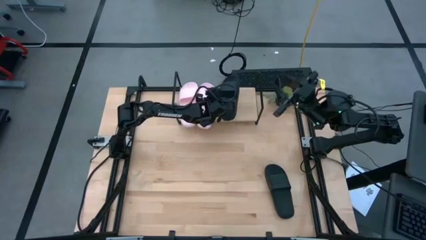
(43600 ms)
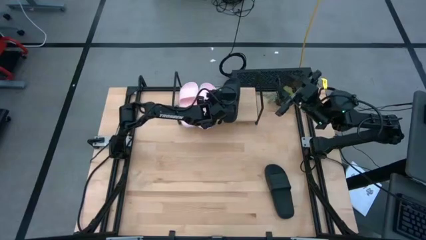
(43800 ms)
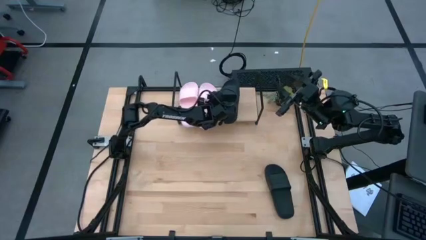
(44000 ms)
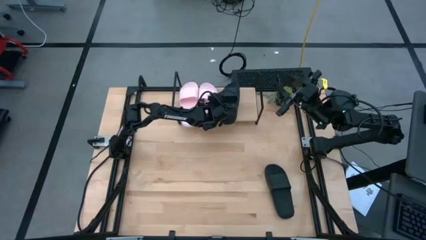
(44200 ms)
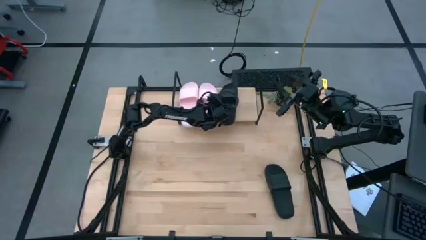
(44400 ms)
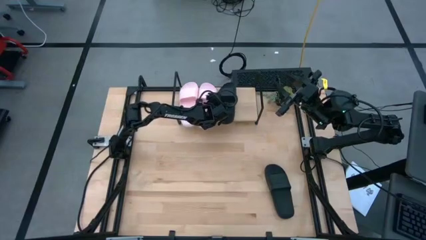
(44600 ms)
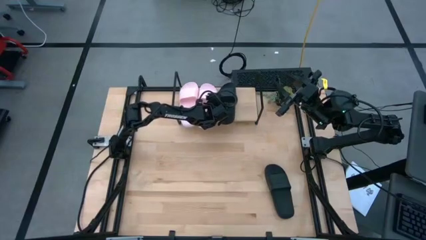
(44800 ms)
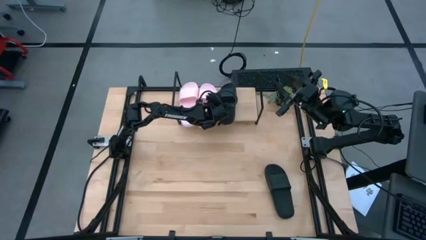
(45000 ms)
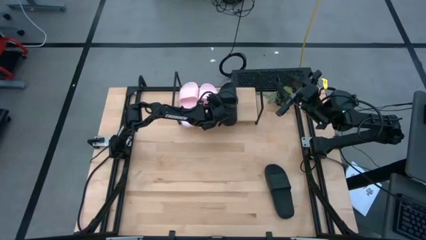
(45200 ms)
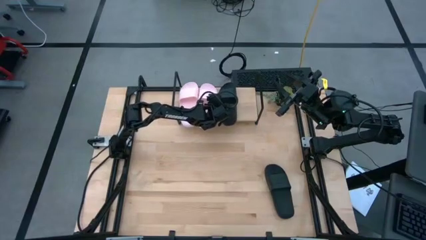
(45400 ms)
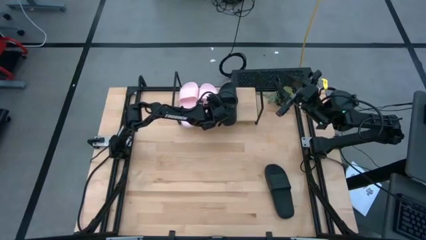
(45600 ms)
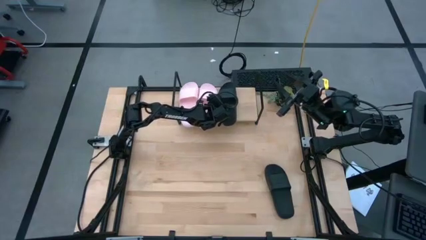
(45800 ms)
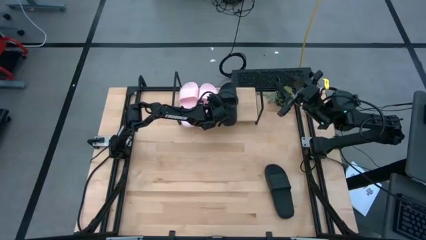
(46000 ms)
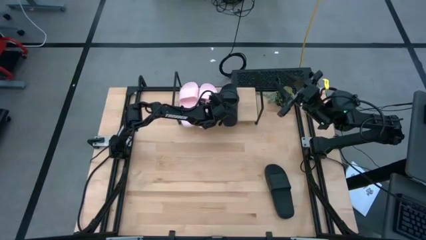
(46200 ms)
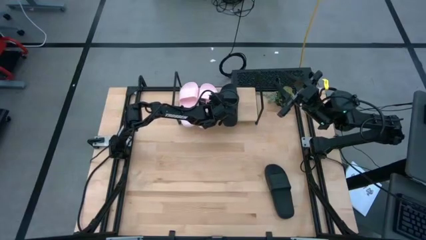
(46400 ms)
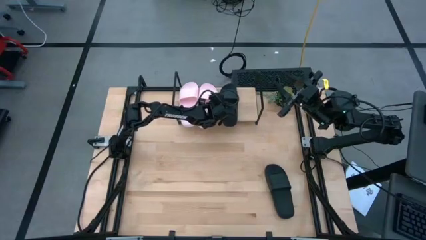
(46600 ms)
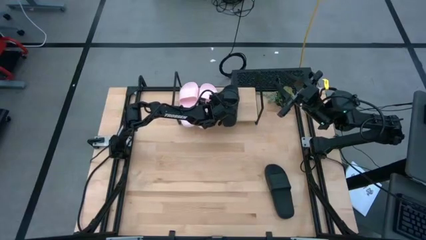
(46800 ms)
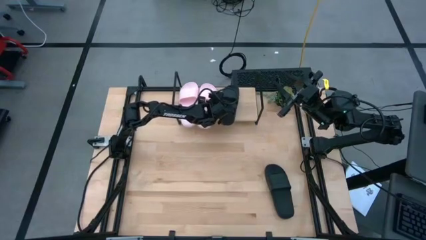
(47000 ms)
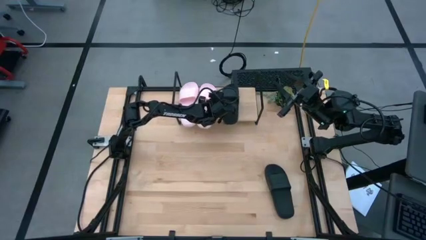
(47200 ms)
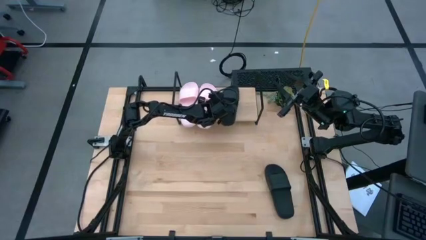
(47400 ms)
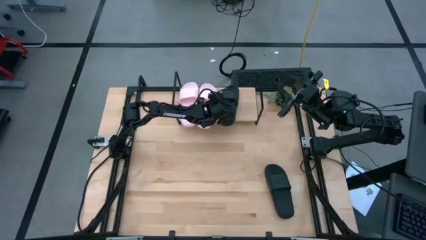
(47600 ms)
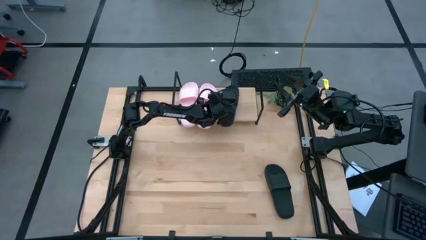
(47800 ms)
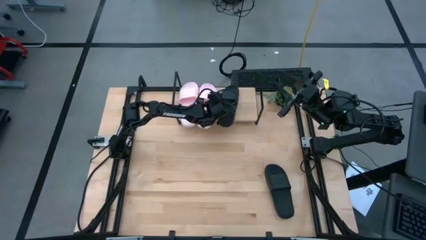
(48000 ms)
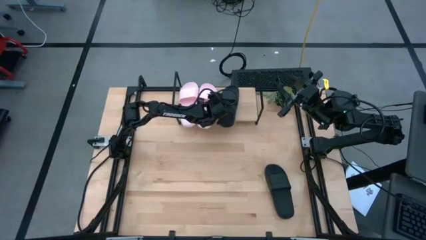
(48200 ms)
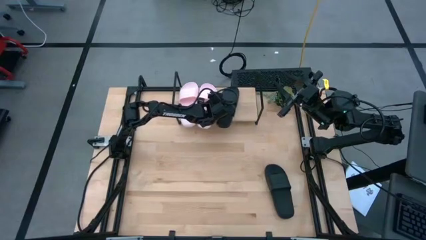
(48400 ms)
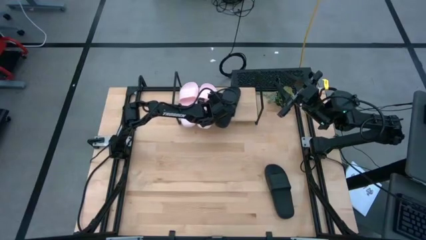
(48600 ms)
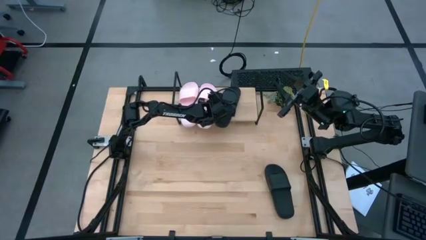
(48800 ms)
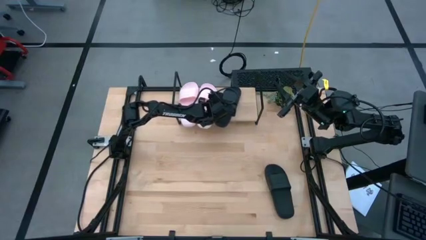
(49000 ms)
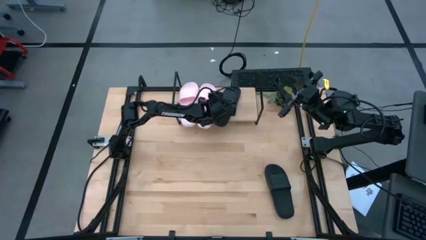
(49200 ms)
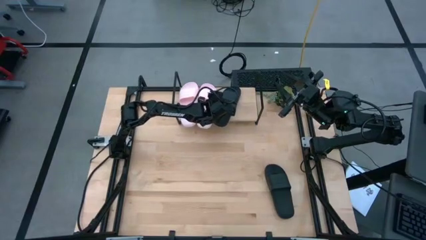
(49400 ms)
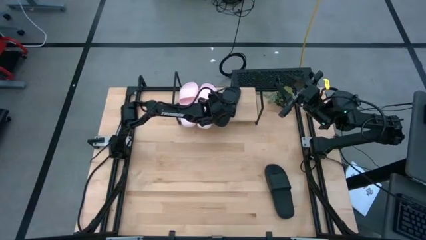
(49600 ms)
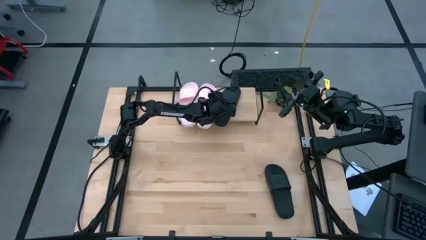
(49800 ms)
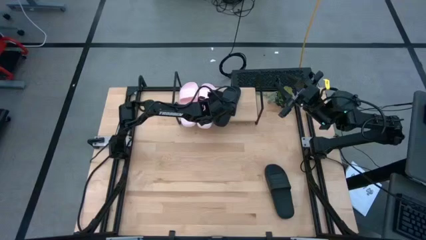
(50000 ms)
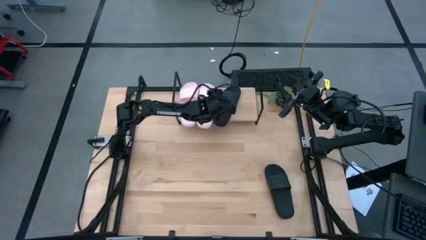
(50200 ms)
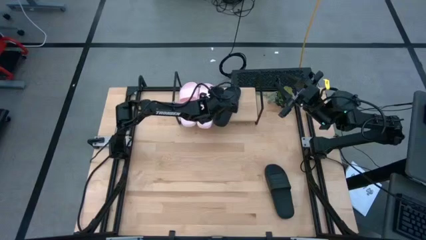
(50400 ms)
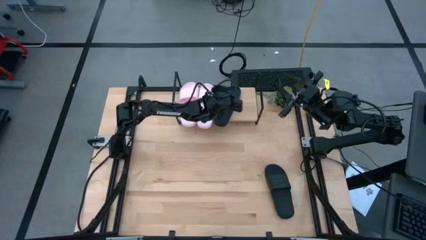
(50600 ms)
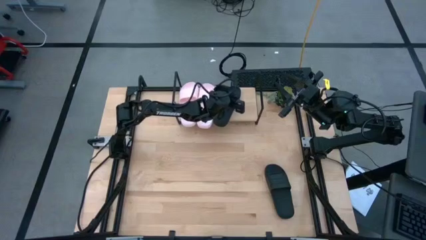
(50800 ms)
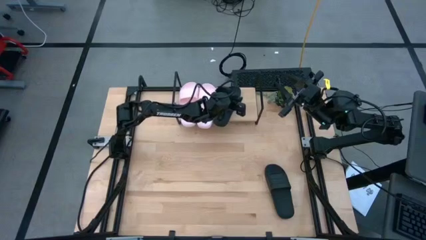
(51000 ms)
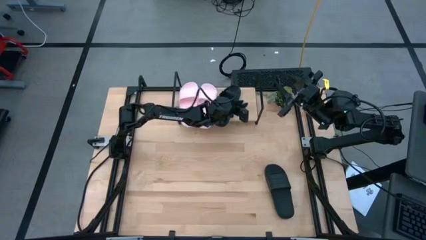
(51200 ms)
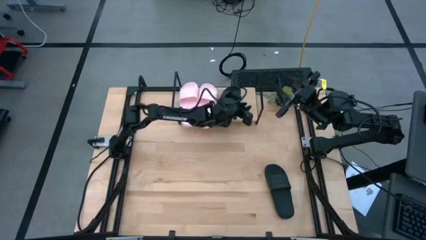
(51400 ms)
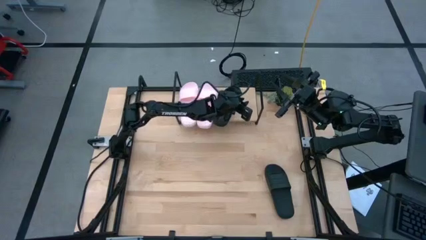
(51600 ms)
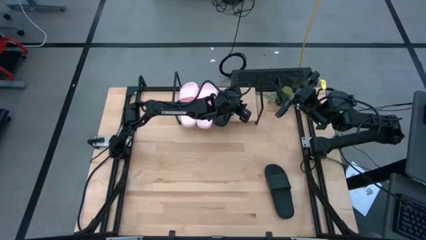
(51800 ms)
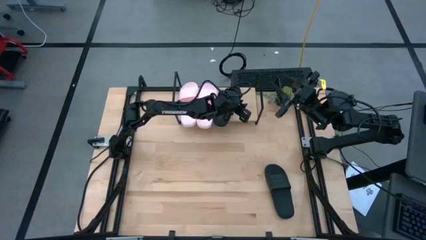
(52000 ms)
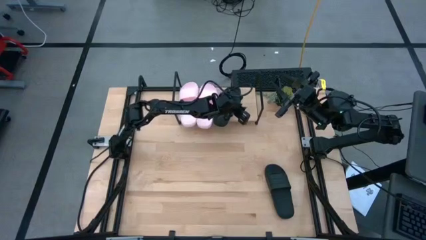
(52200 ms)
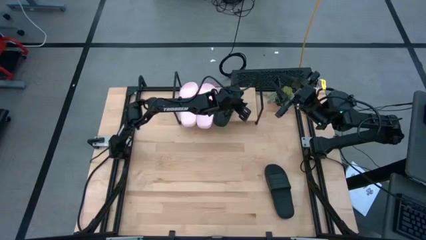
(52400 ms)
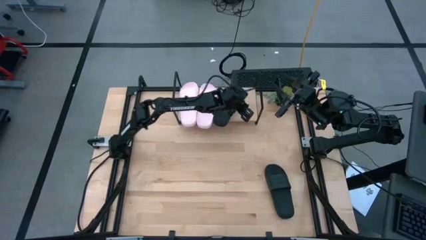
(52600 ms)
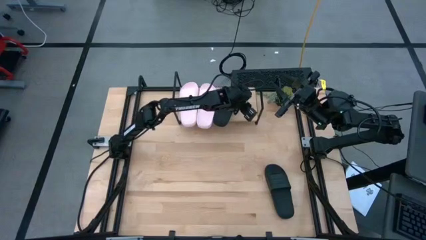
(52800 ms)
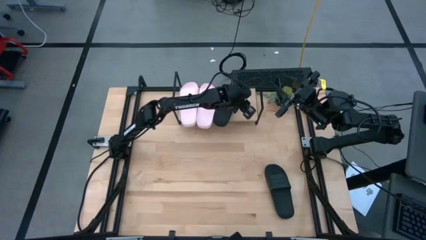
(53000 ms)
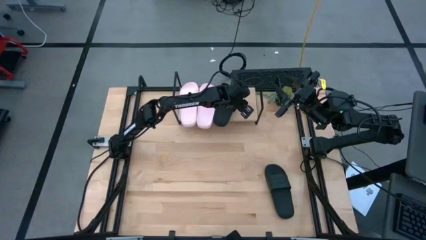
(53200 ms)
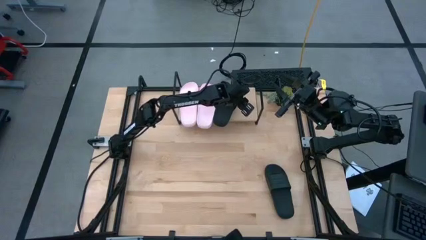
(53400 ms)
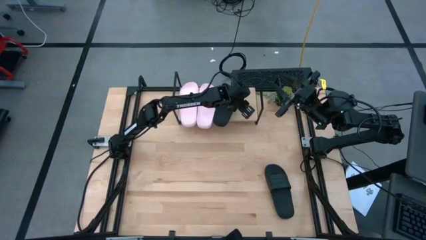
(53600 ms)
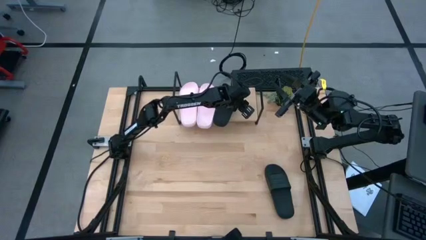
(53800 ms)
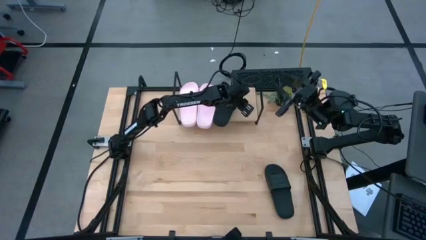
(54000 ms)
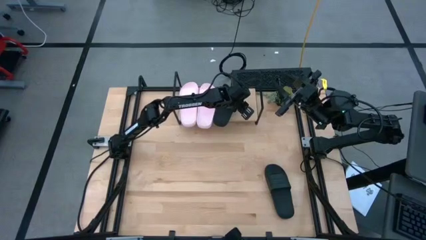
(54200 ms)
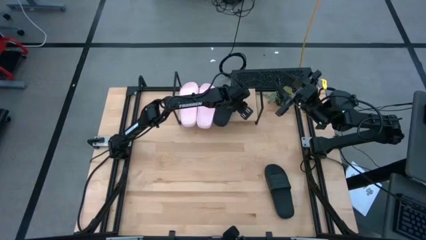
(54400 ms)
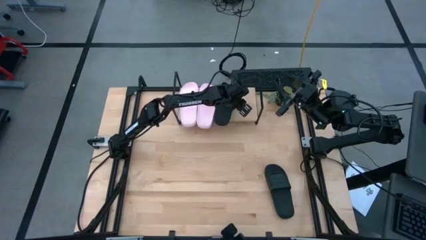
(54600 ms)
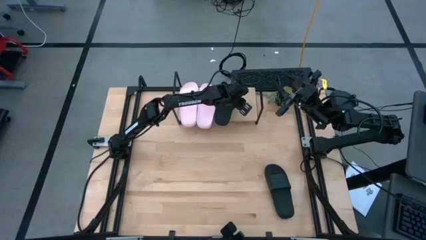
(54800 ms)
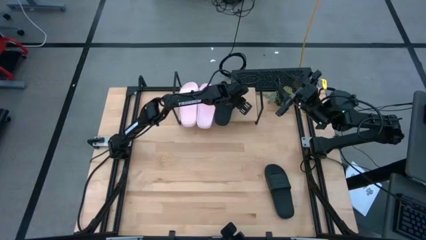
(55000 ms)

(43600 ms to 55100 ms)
Task: Pick and place slides into the shelf
Put the top black slipper on the shelf
